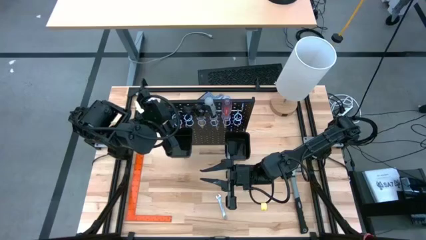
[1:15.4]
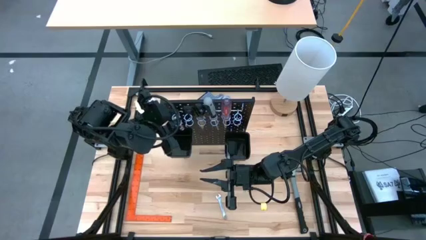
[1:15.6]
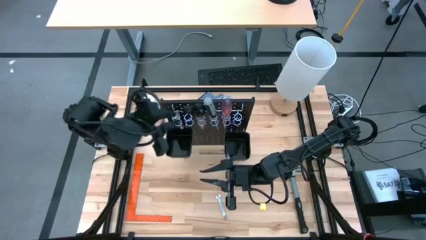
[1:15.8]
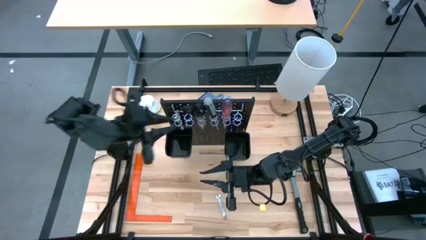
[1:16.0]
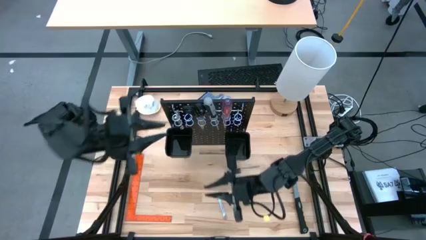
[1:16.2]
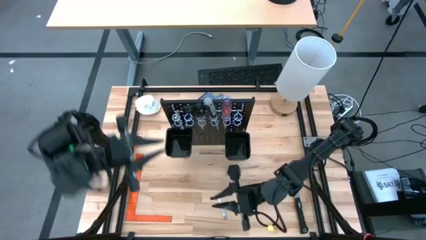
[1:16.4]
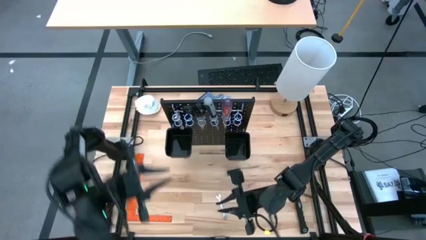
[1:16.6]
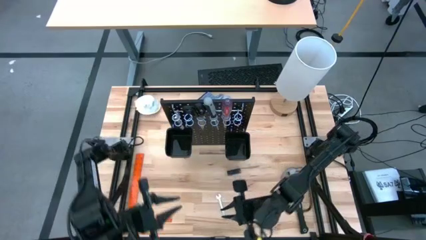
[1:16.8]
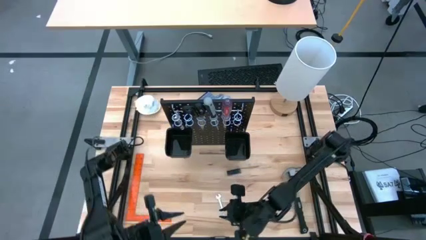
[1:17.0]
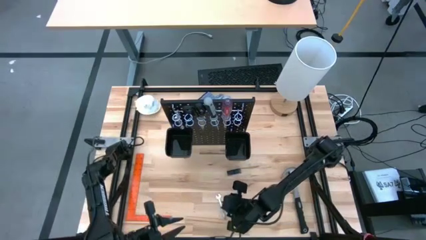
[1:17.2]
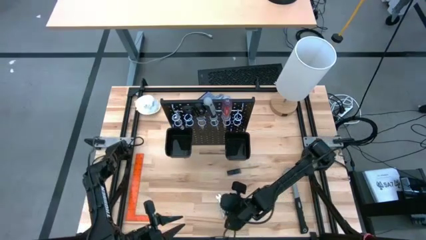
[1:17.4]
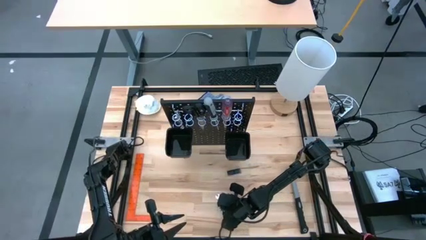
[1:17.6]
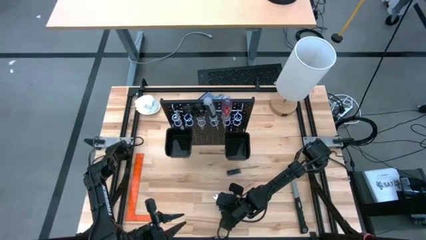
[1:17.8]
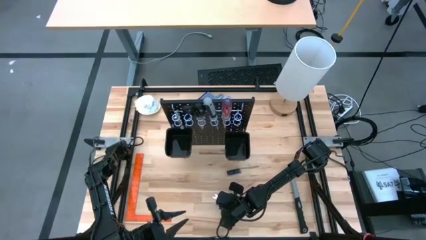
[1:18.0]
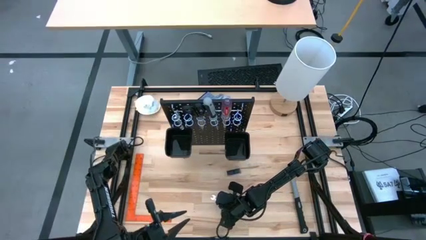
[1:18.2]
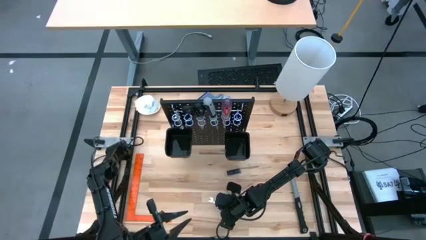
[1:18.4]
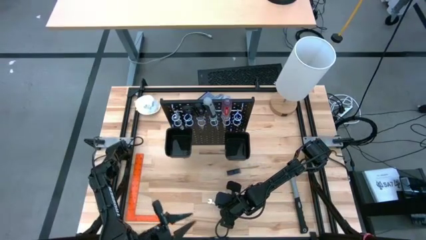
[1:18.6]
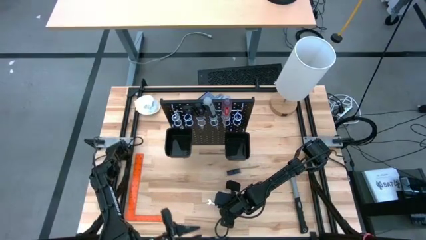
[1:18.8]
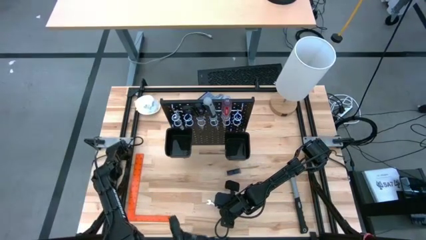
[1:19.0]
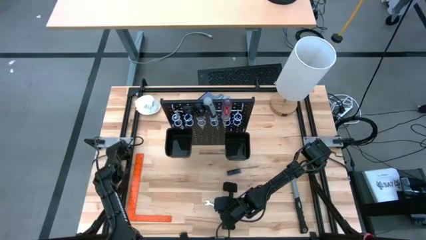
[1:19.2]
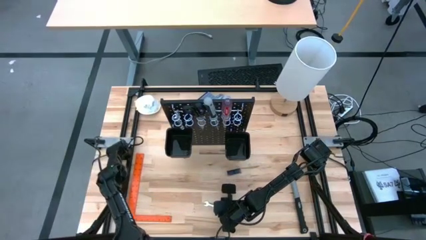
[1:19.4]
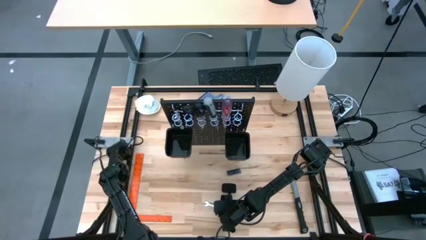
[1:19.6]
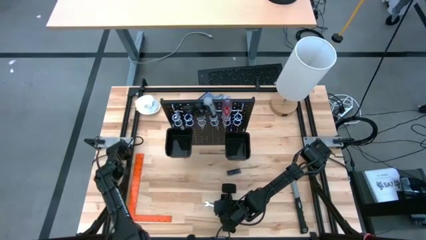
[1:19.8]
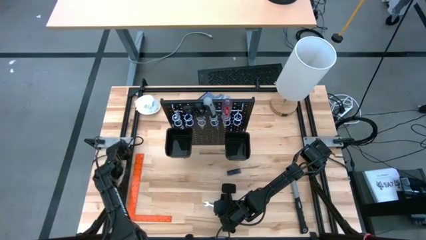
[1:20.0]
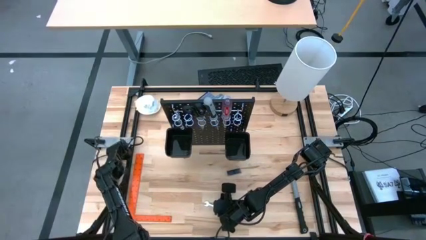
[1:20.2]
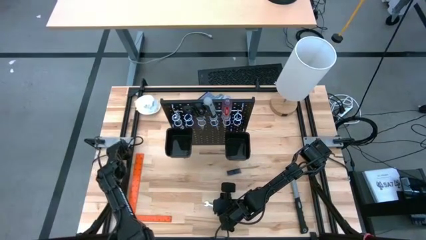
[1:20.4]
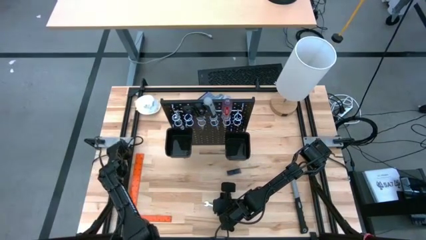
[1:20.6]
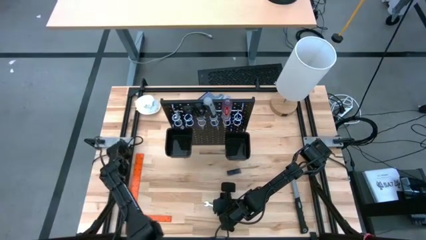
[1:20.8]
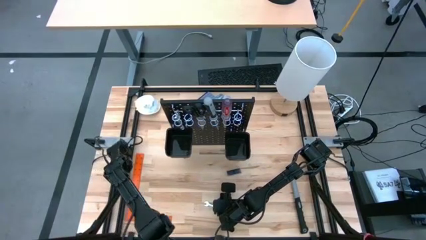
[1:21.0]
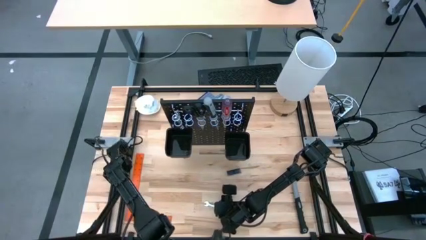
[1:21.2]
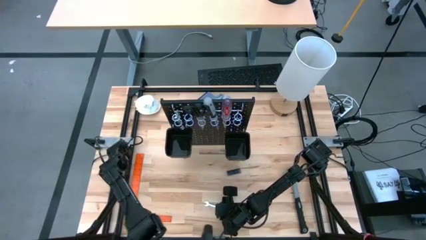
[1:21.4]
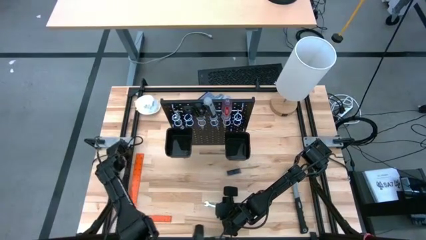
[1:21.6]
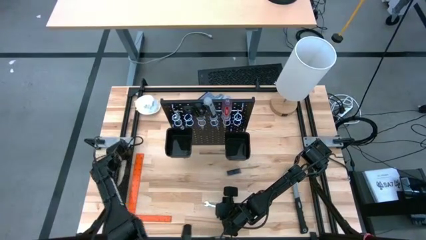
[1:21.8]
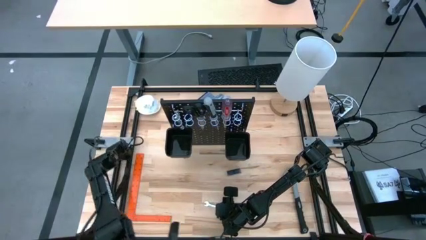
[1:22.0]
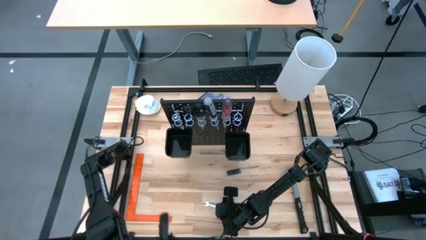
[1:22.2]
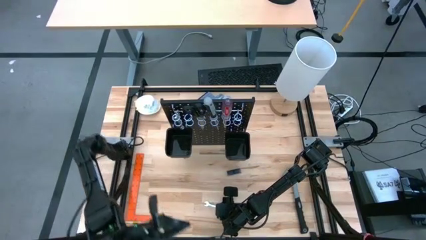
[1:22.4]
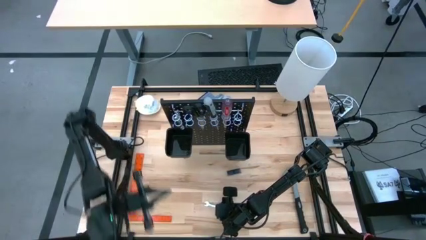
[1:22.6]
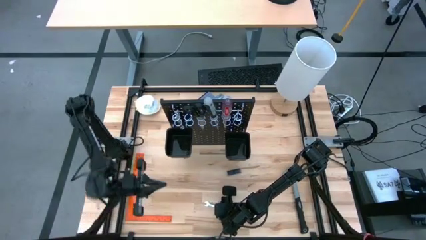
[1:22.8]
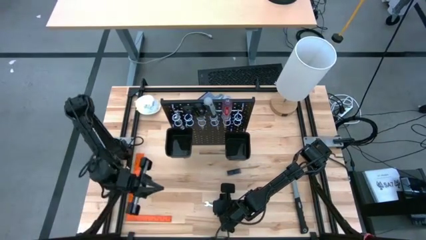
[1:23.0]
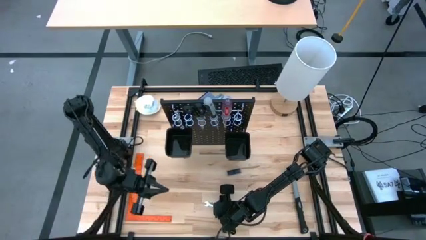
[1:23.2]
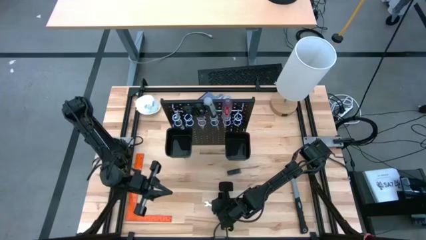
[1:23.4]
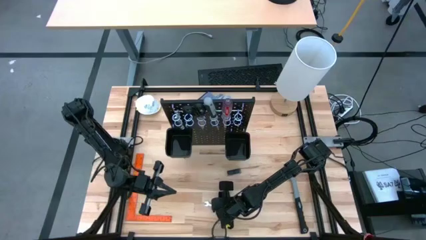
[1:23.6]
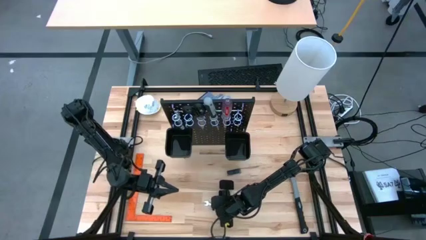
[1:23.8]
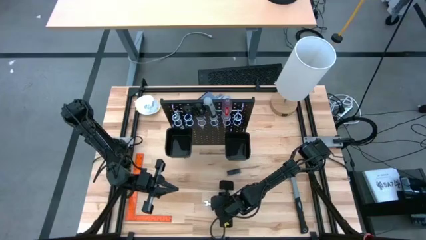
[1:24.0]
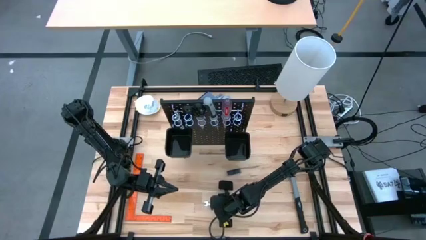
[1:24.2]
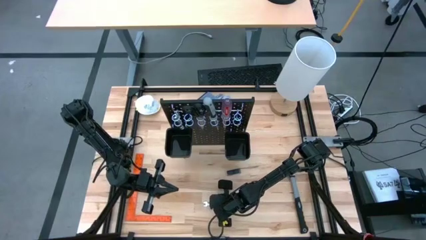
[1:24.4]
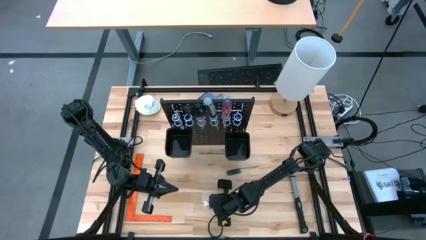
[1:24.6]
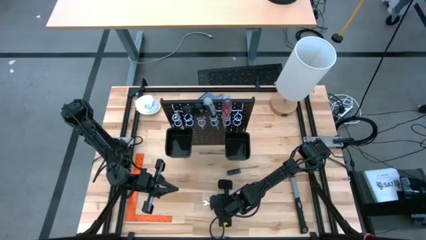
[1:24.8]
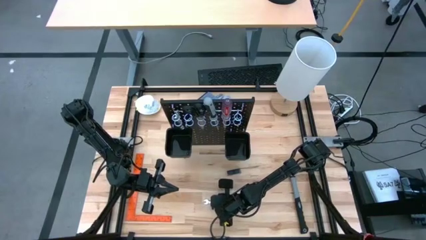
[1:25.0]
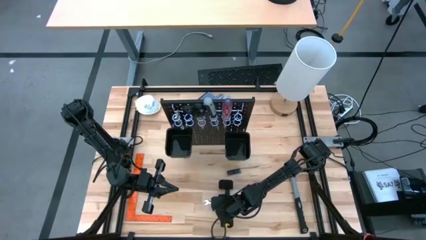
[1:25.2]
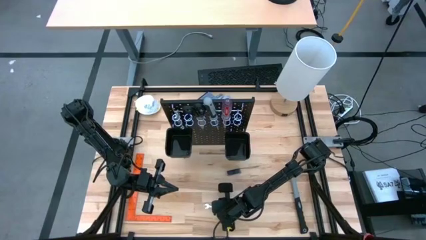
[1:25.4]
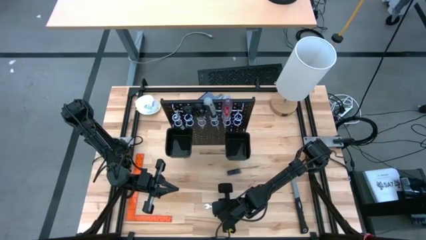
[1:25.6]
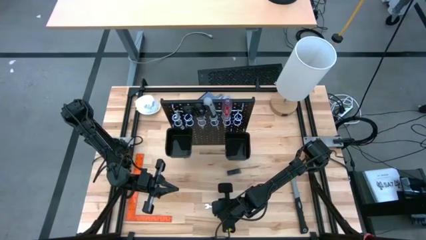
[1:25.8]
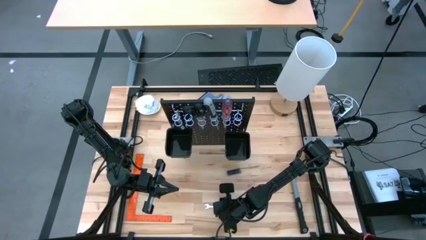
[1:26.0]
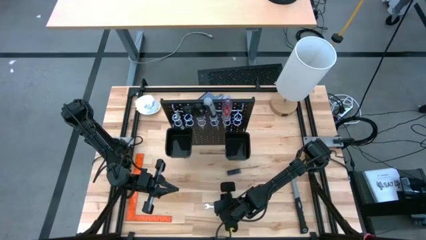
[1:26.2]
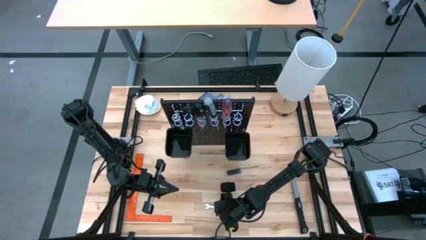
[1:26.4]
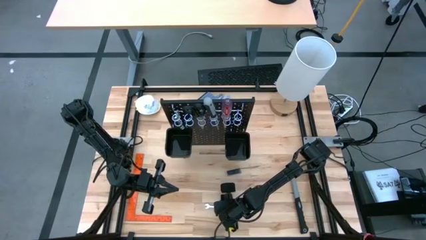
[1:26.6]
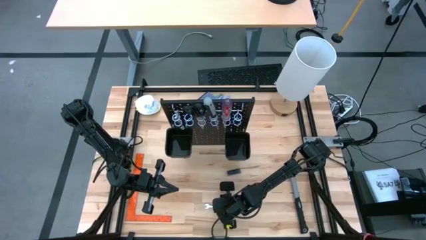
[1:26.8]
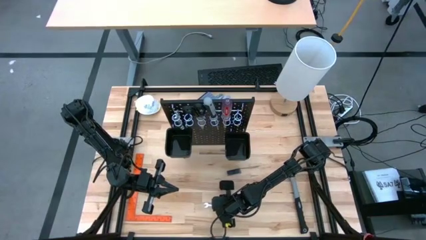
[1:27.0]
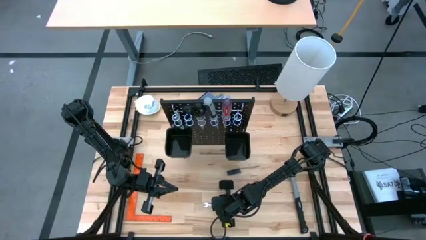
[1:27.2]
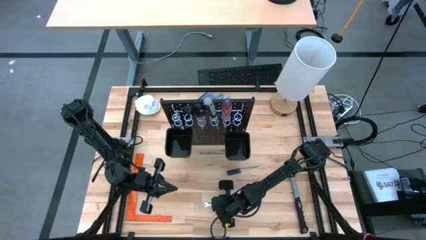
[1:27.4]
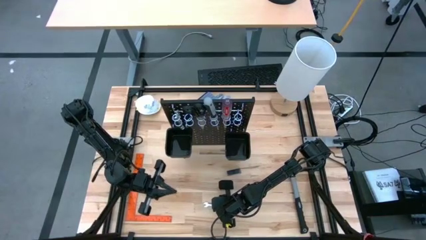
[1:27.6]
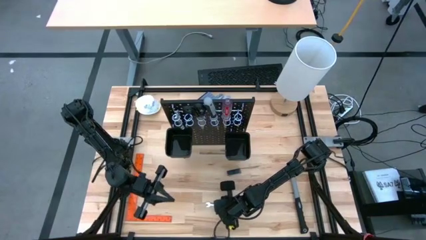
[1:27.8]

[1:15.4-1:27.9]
Task: Hang tools onto peg board
Hang the silver wrench on the black peg board

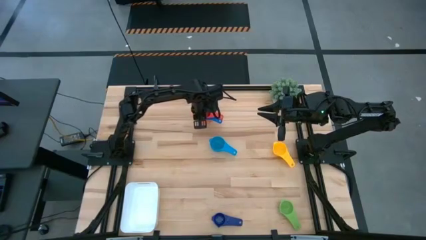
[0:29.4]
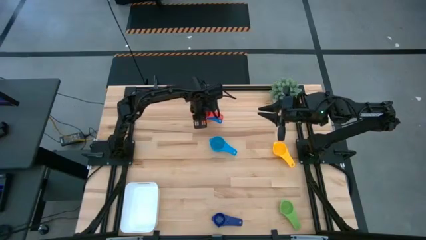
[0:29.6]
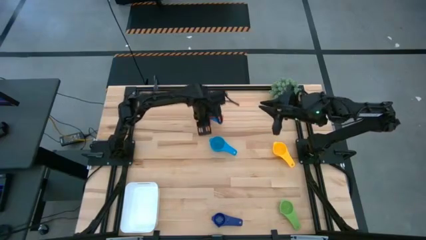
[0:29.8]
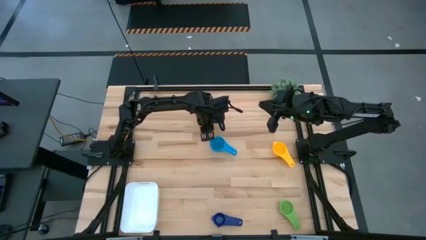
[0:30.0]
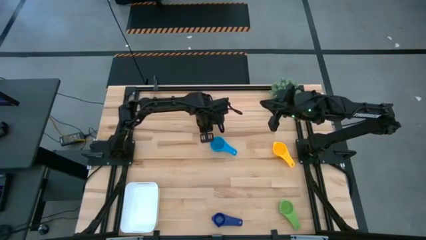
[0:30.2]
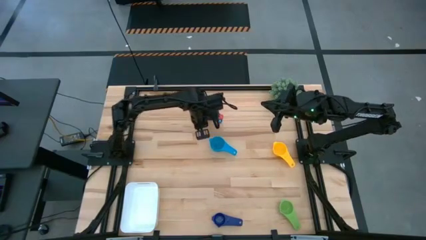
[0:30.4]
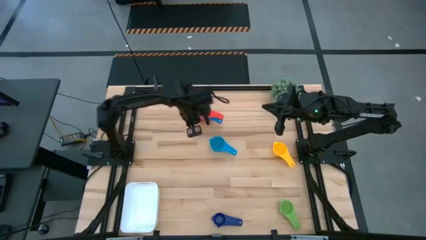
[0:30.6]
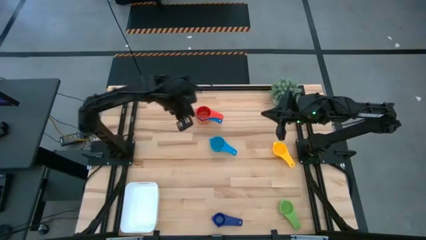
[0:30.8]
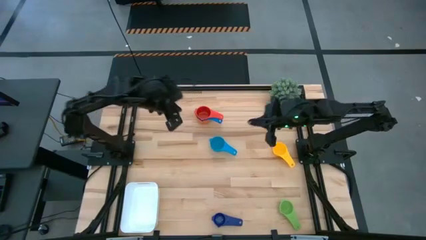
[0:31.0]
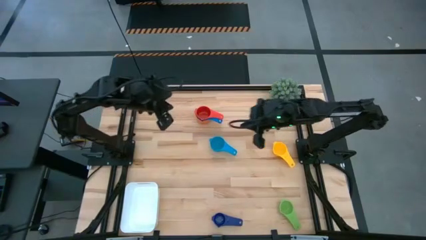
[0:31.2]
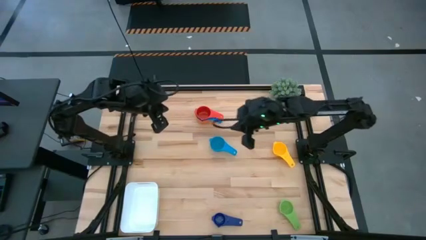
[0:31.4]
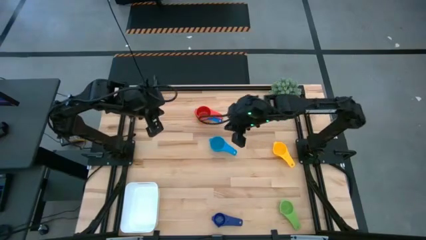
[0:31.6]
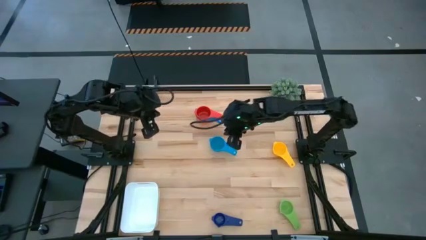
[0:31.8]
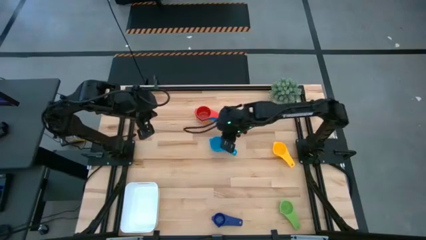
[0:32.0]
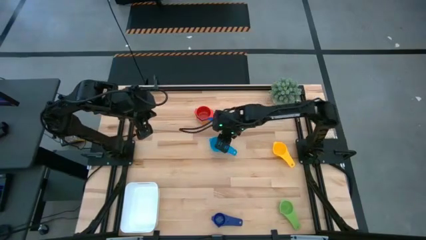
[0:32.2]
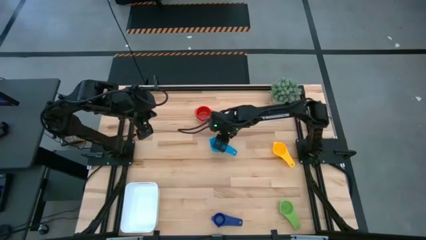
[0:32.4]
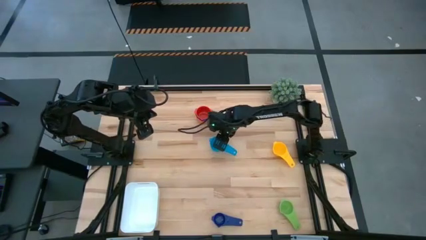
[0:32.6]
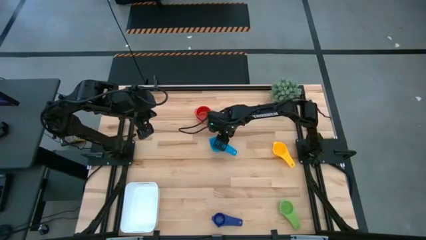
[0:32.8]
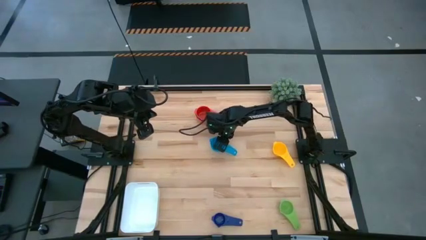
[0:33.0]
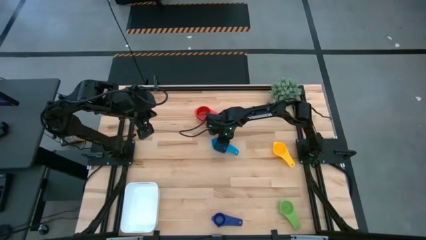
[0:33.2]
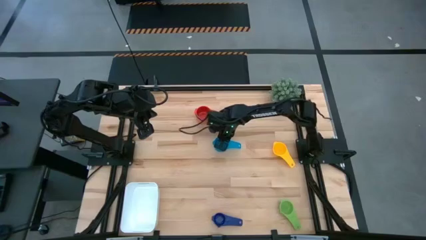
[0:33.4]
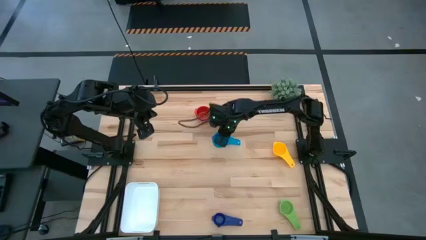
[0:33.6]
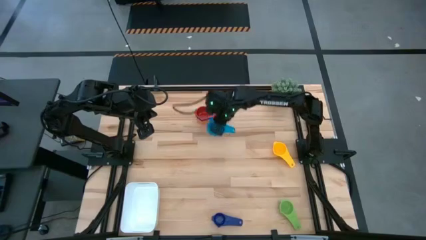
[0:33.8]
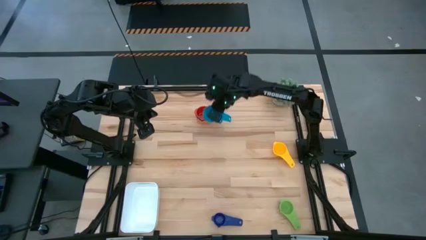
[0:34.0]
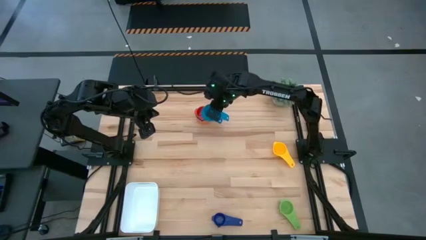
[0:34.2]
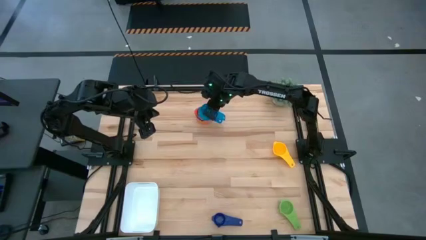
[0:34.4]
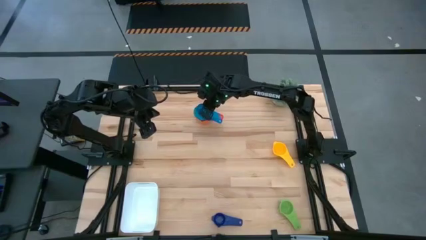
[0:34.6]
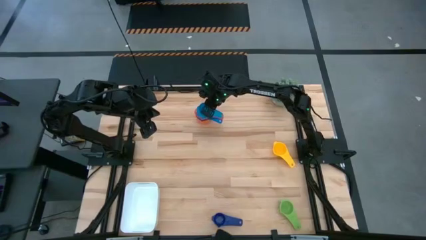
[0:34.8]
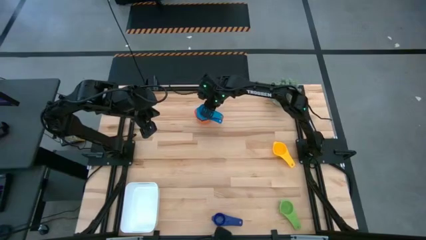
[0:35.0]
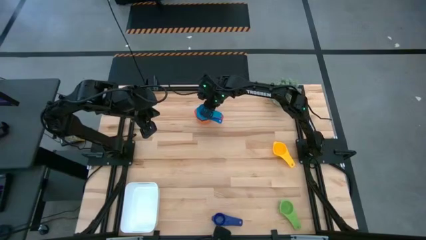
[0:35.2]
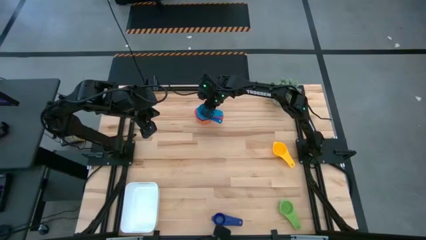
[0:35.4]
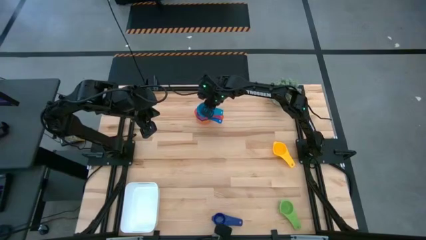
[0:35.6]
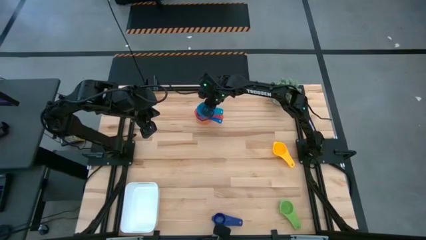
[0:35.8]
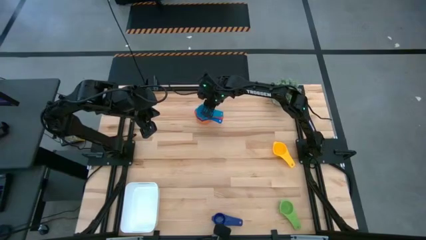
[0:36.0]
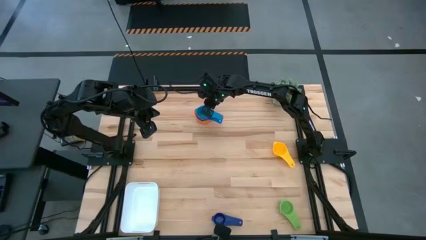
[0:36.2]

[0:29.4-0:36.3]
Task: Nest measuring cups in basket
Stack the light blue measuring cup on top of the red measuring cup
